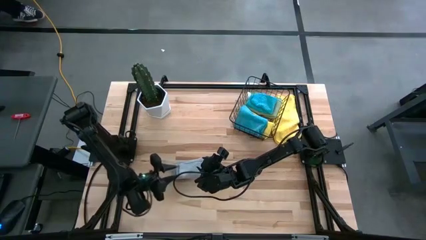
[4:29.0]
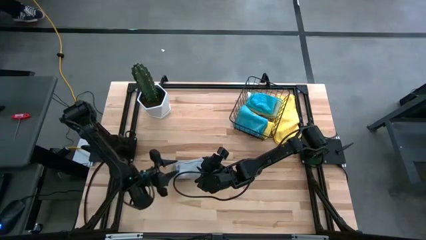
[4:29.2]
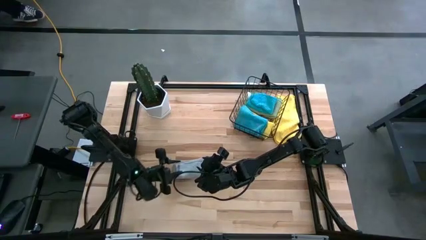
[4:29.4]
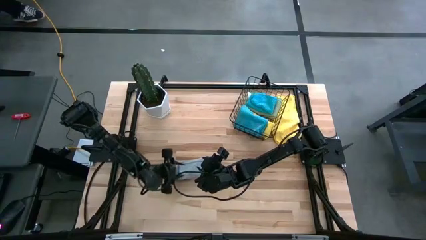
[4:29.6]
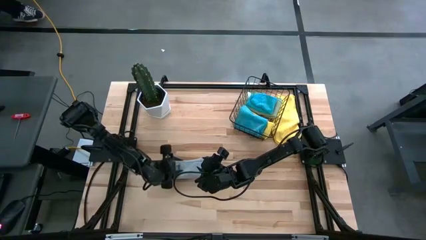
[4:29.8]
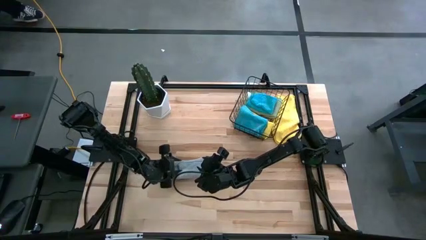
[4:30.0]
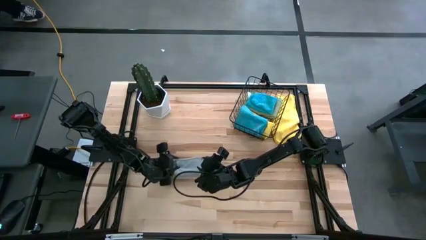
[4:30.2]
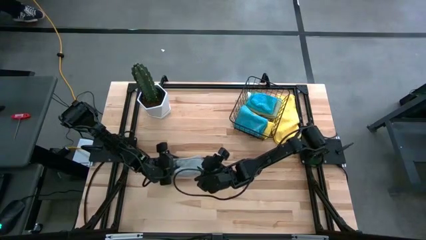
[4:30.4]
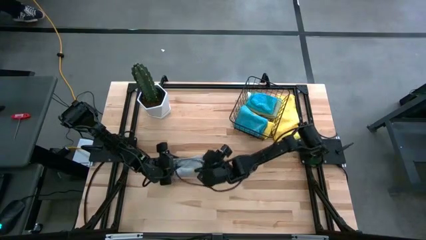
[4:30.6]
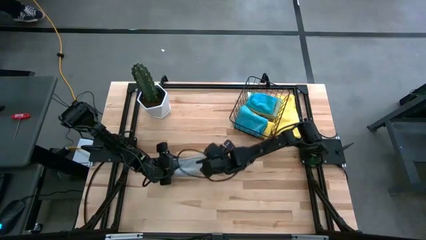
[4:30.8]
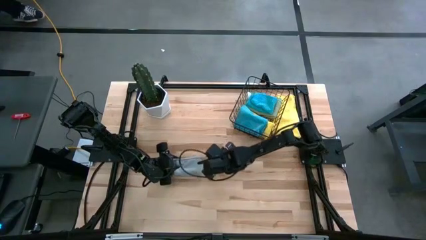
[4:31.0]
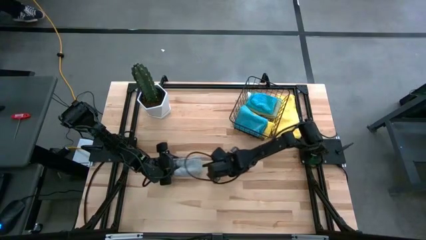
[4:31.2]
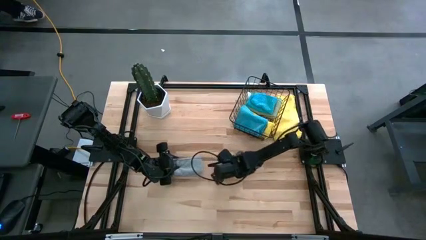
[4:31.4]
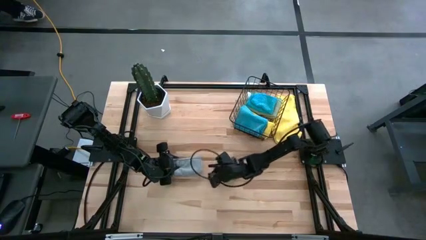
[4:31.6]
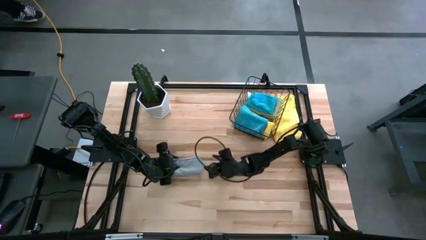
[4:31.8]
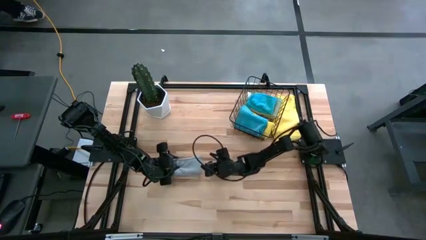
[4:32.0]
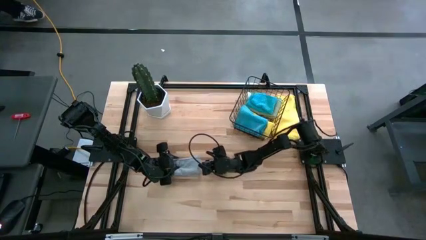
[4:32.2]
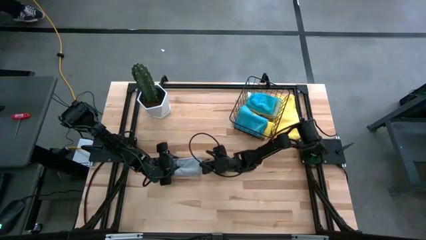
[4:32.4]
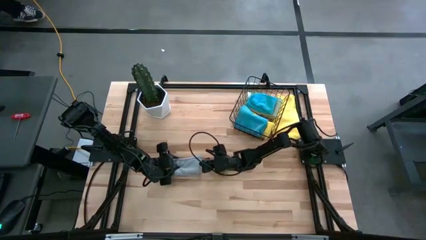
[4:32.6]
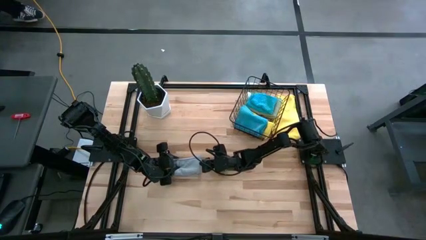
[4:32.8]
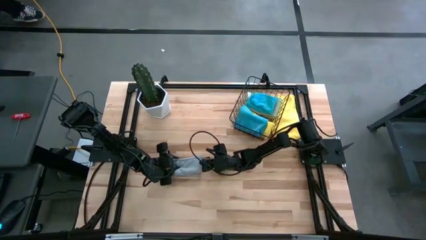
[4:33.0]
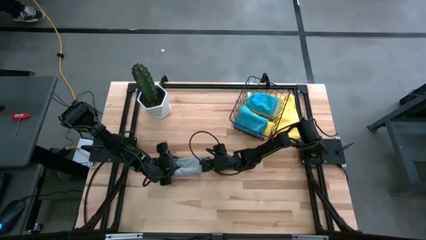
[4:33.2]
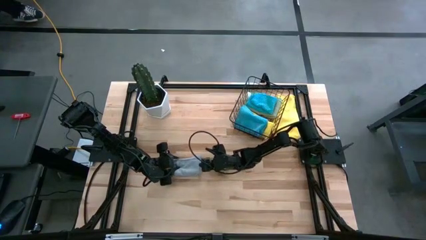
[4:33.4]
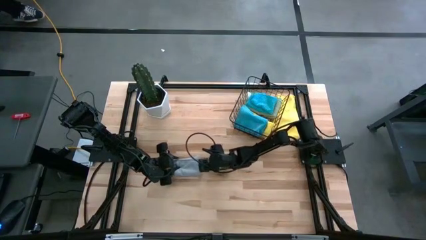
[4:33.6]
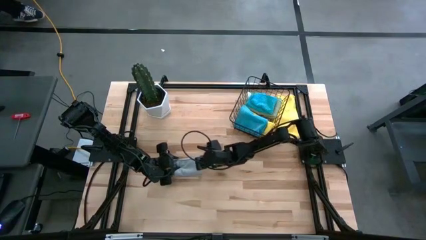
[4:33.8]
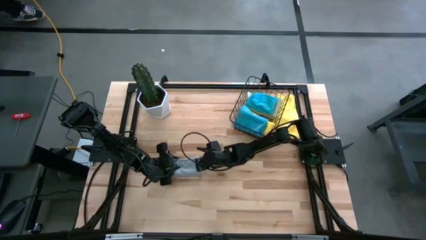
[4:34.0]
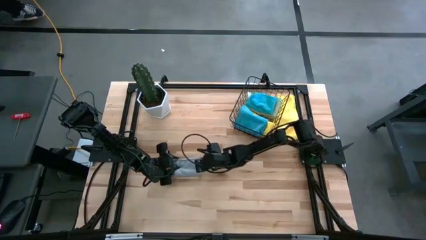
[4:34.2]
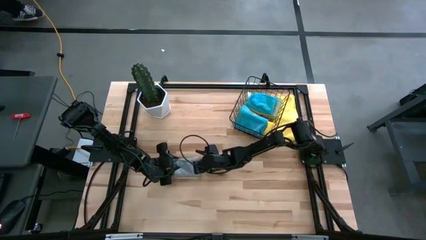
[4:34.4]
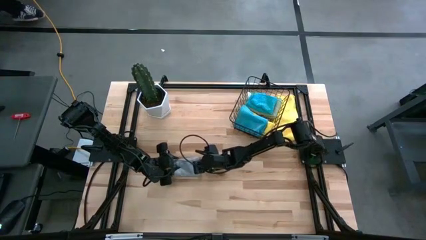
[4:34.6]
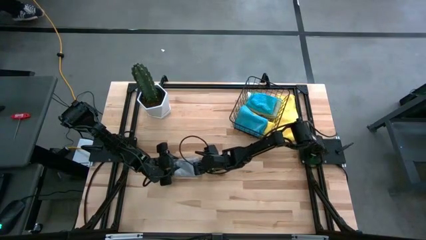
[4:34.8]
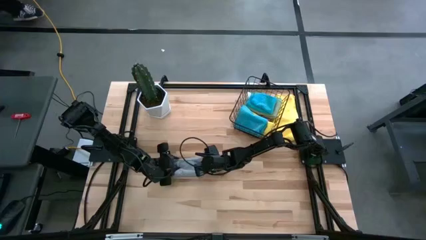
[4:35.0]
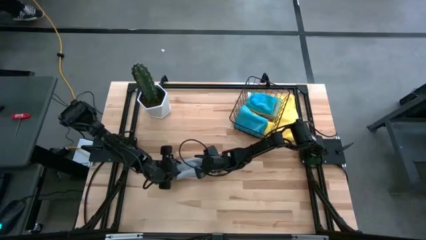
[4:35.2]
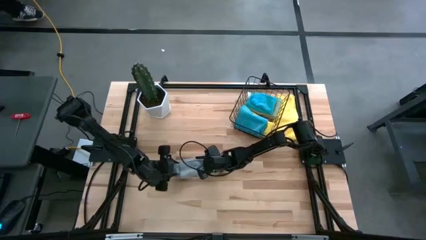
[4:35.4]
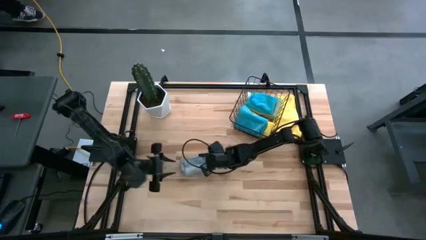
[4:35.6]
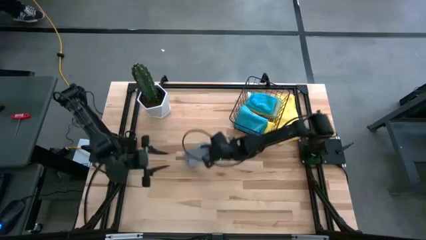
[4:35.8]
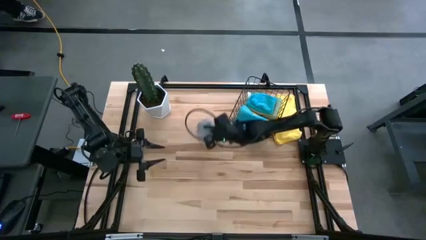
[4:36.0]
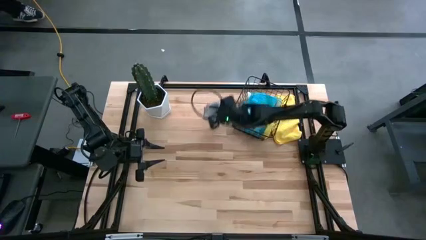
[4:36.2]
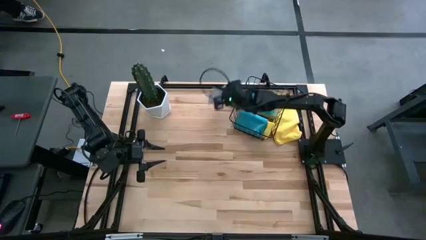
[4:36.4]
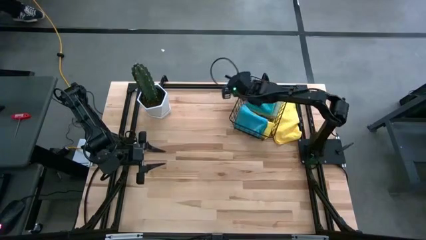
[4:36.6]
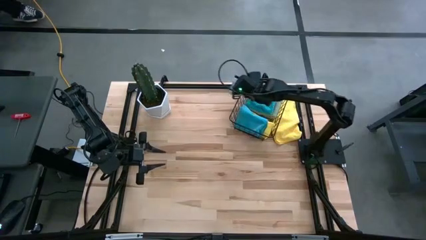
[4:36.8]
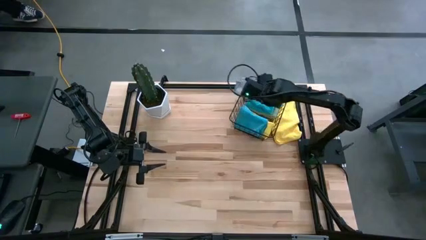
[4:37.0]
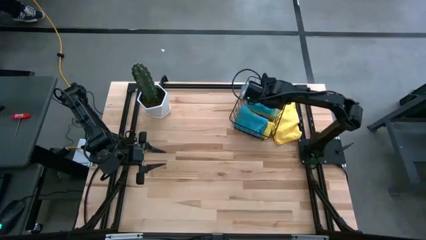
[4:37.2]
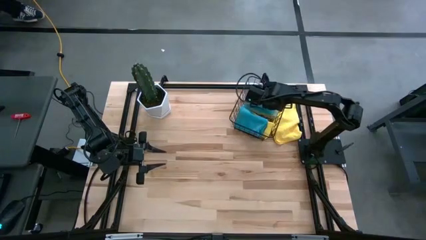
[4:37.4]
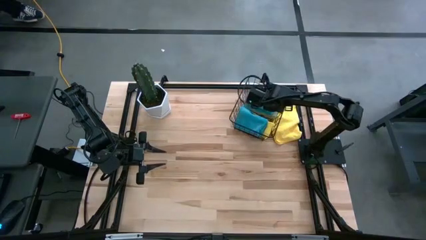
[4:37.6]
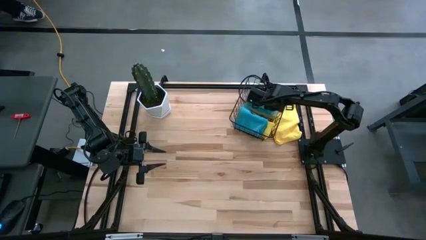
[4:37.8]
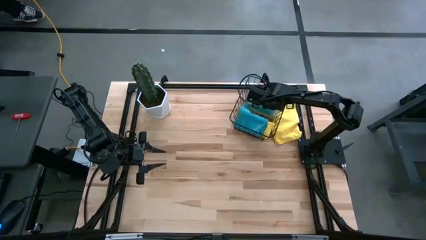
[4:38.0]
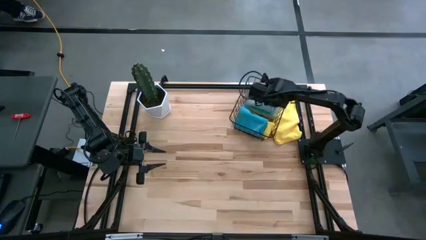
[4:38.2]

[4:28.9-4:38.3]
Task: Fold microfiber towels
Put the folded gray microfiber towel into the black wire basket

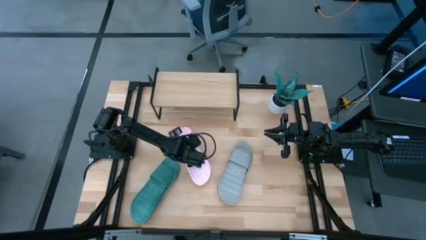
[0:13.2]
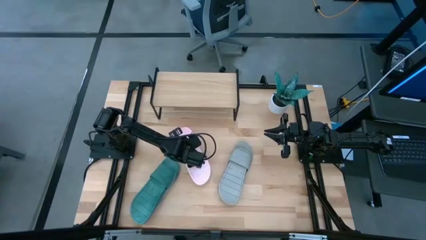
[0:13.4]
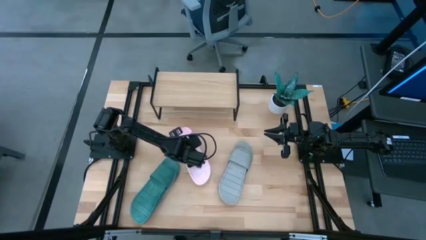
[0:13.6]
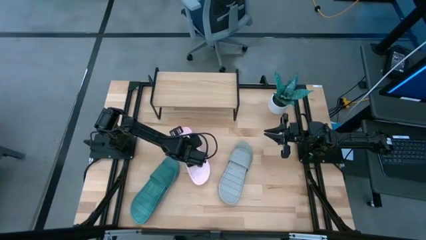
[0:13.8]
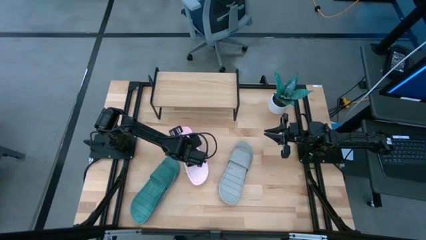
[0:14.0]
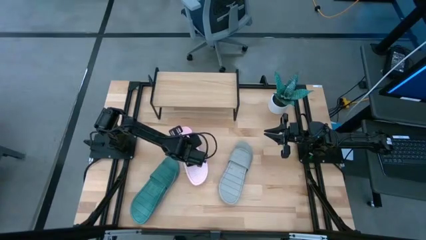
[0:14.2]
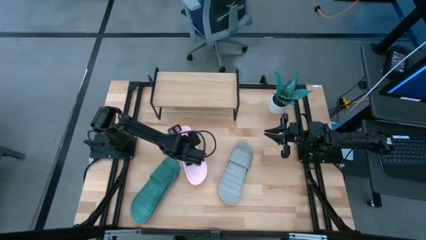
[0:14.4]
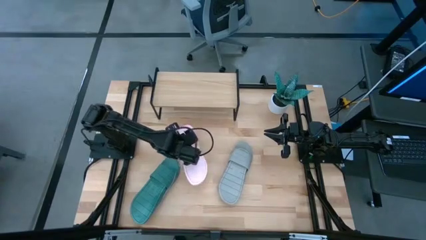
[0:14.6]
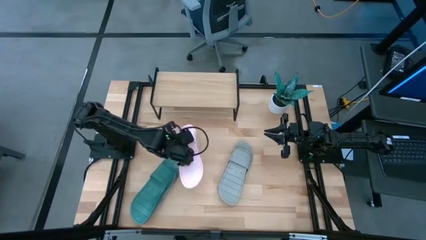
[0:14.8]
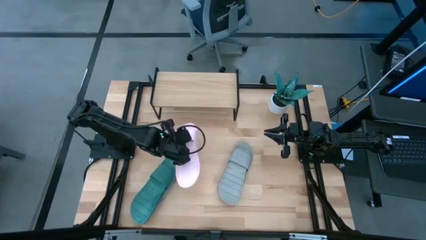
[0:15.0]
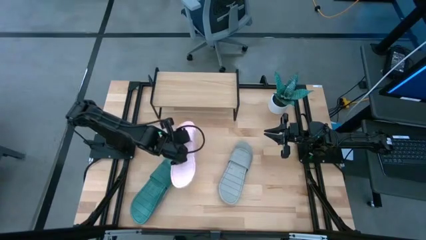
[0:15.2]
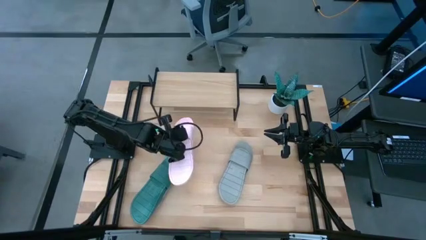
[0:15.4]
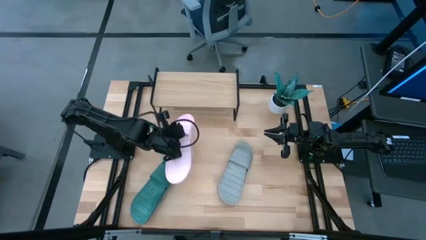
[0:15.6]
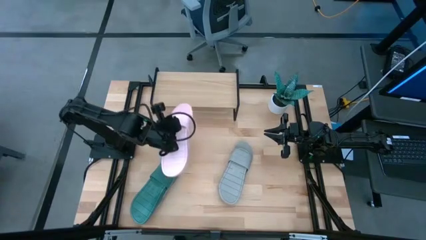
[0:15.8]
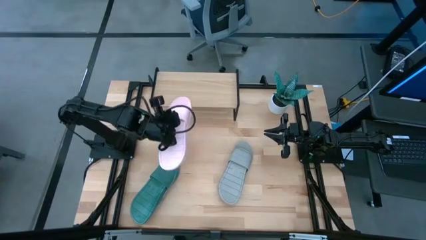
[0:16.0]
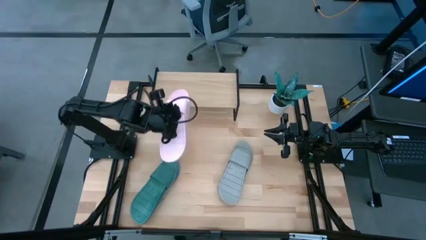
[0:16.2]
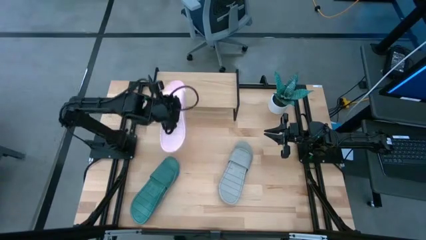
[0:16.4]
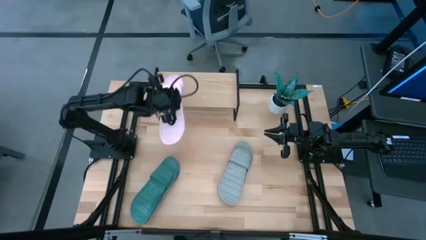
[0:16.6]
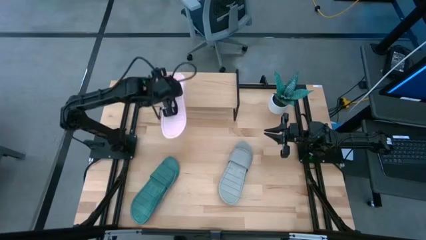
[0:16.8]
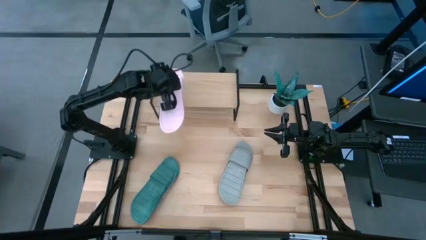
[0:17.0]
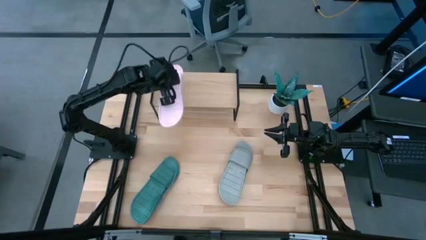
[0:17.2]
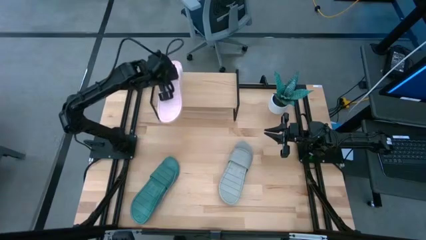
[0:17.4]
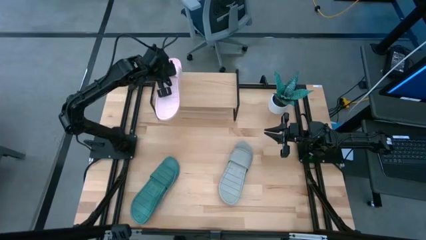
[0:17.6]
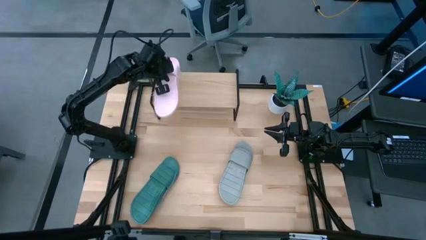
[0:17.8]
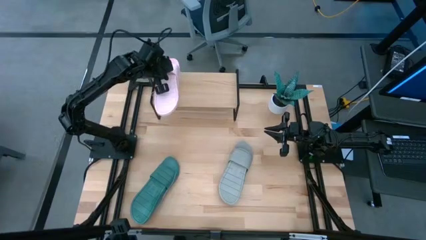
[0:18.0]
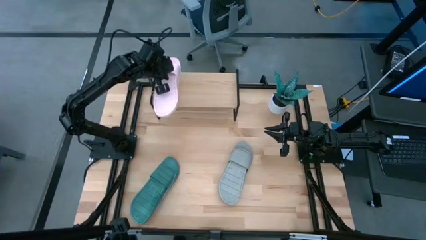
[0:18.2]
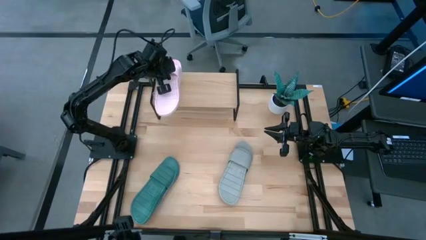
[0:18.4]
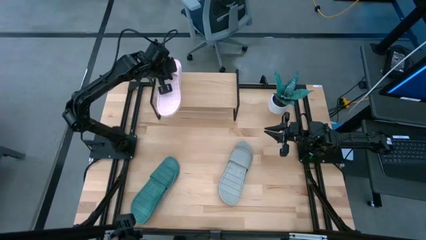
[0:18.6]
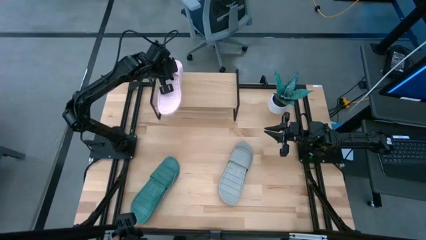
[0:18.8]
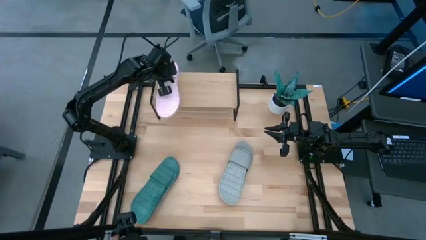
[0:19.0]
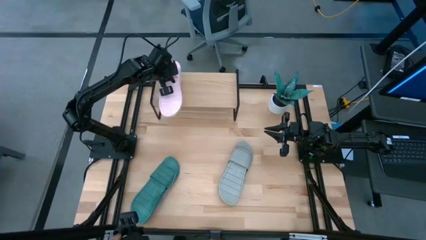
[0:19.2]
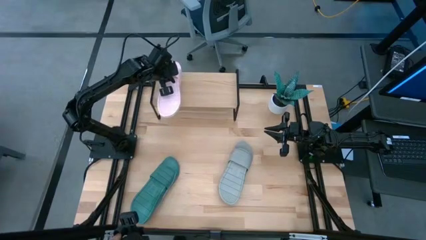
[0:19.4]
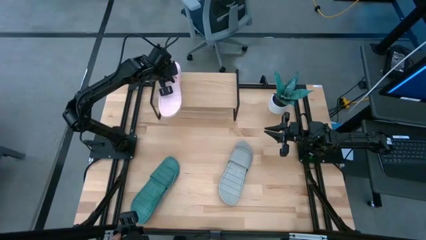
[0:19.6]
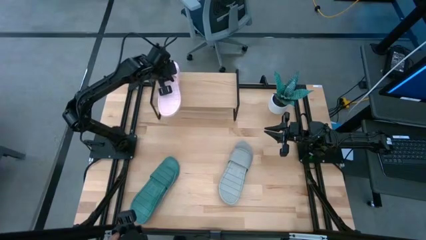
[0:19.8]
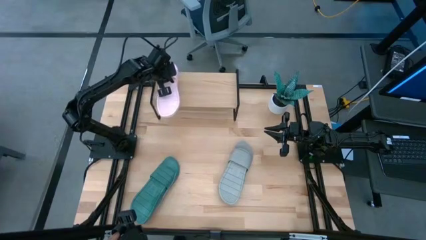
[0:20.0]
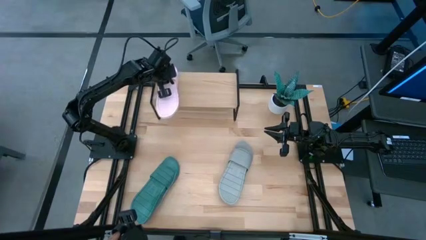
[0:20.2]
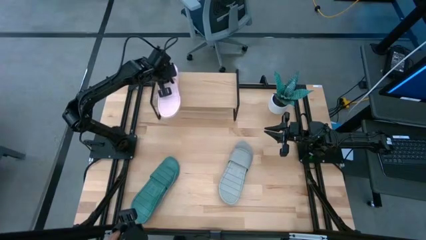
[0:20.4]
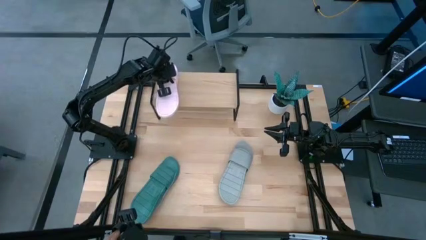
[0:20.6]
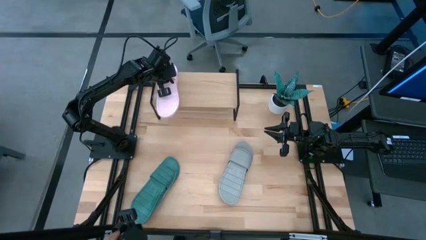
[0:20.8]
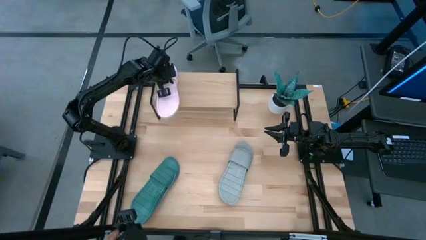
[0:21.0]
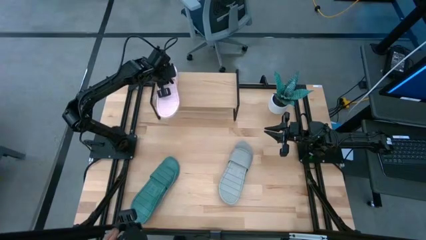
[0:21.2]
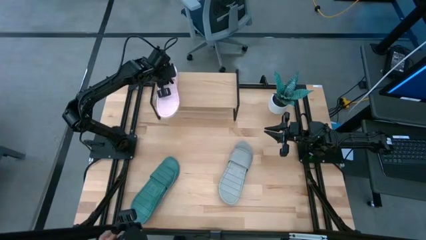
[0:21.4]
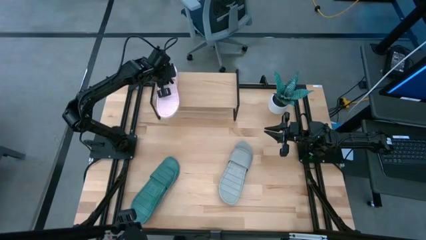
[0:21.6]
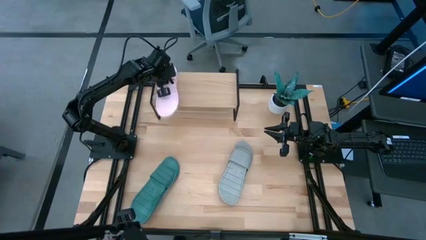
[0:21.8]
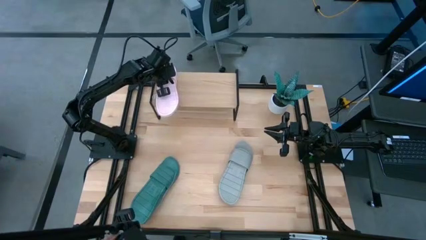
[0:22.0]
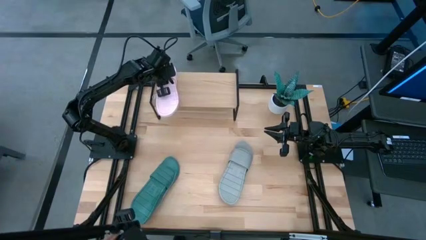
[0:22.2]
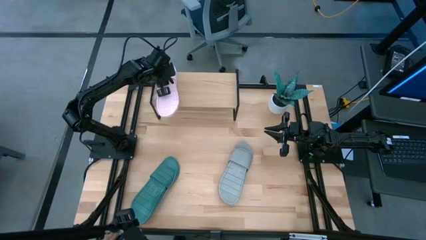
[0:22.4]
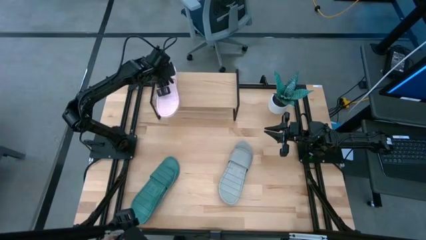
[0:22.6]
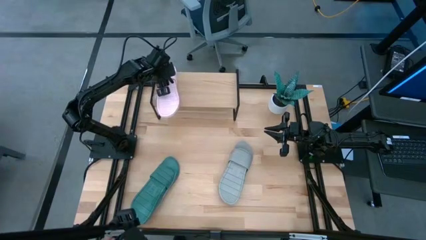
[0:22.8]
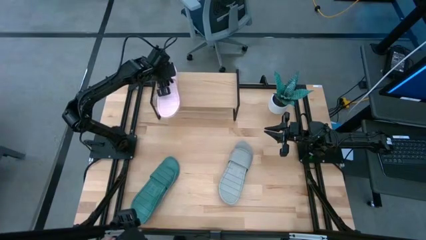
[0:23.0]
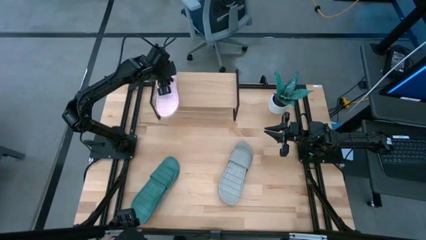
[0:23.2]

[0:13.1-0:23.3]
Task: Pick and place slides into the shelf
Put the pink pair of slides on the shelf
